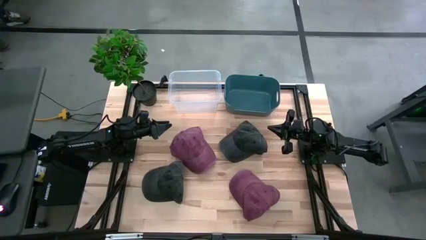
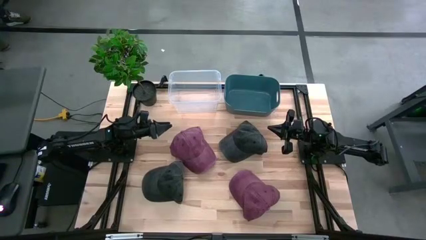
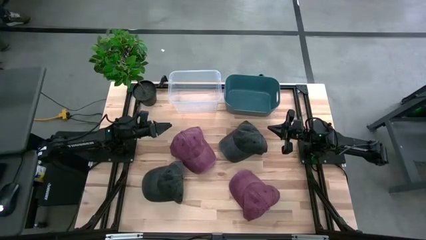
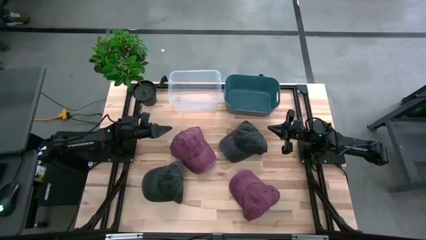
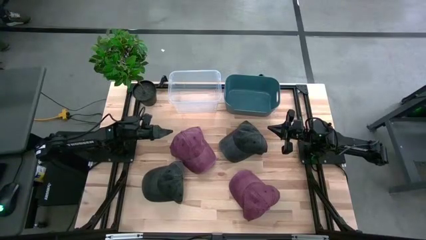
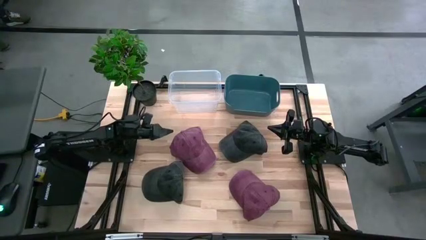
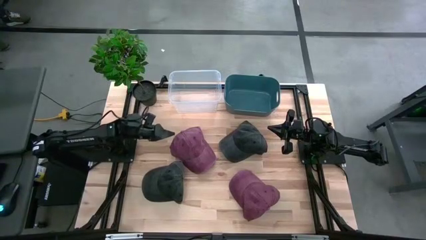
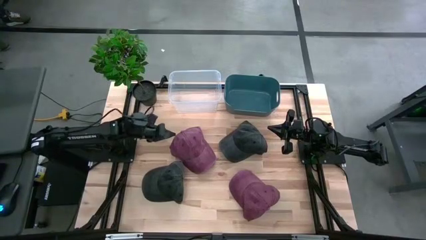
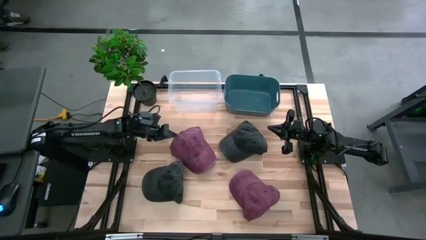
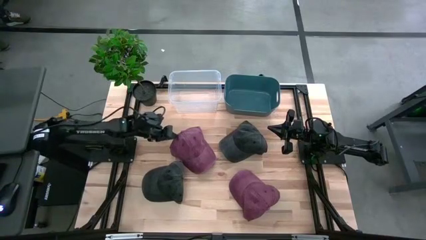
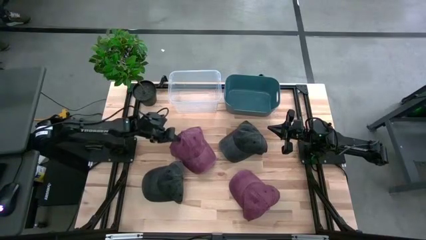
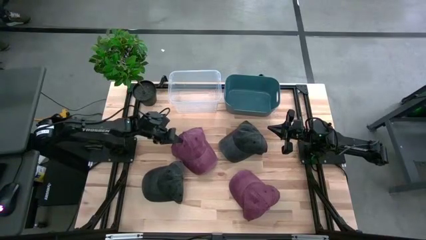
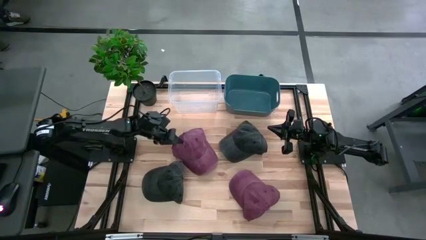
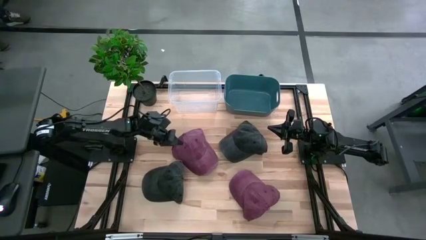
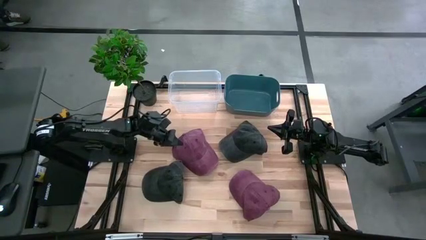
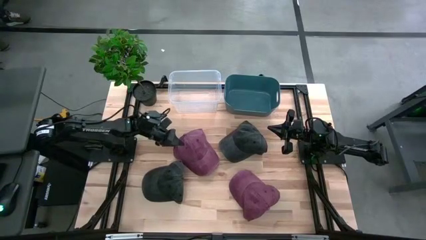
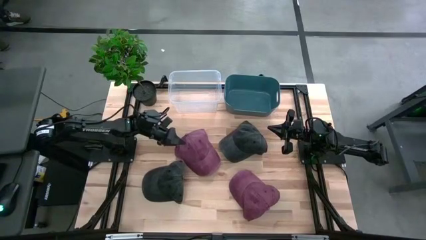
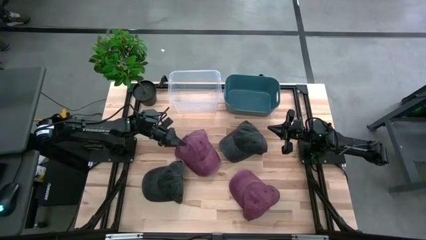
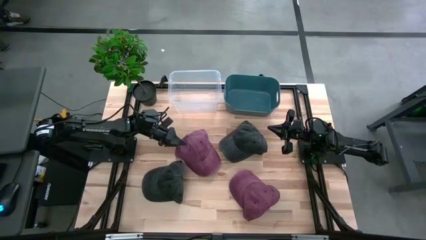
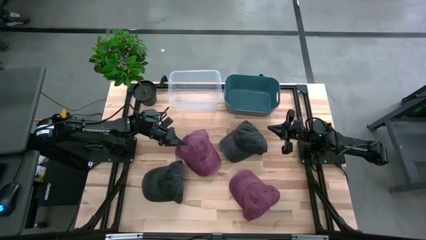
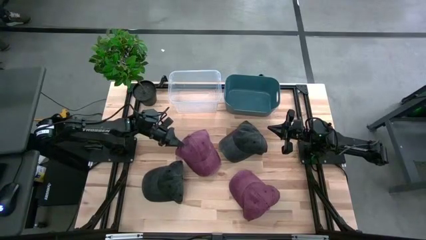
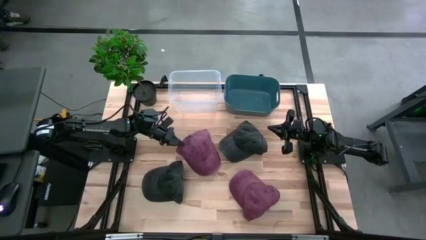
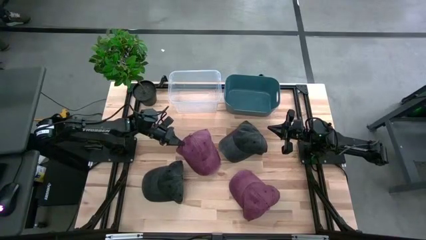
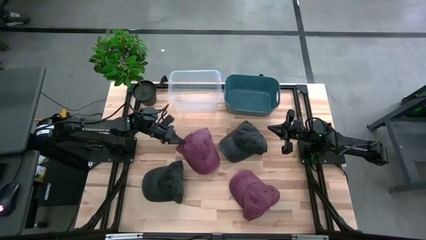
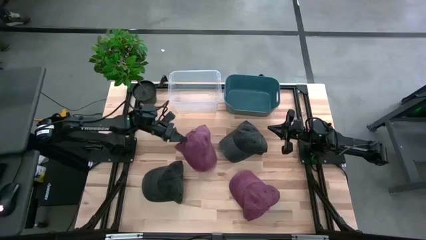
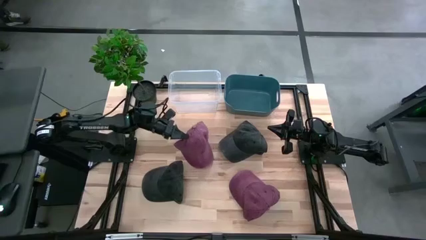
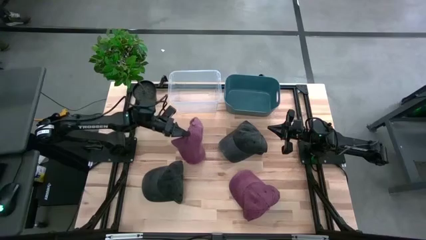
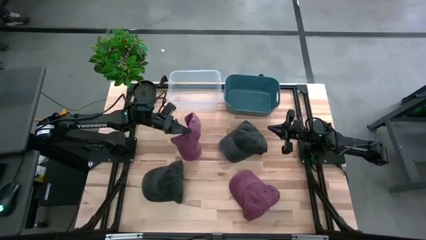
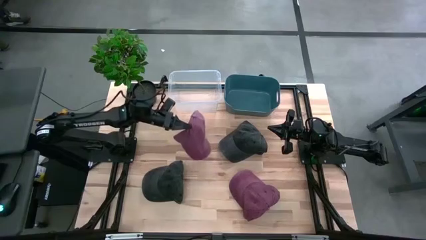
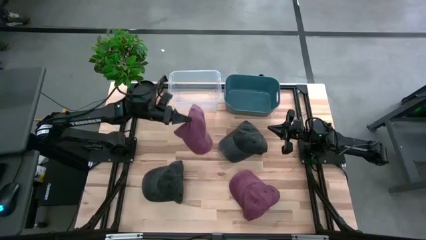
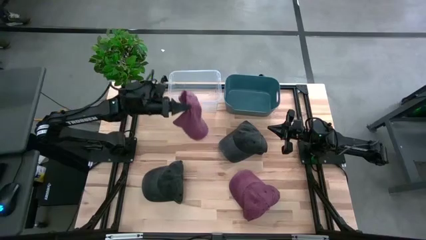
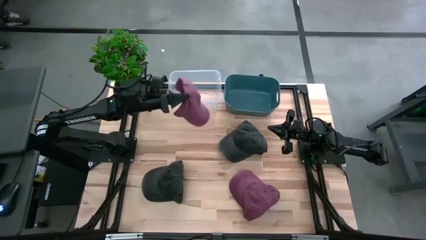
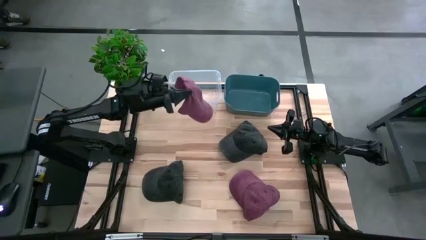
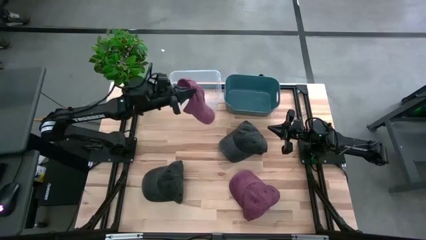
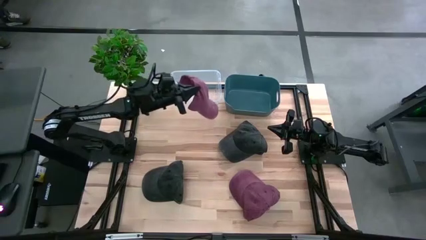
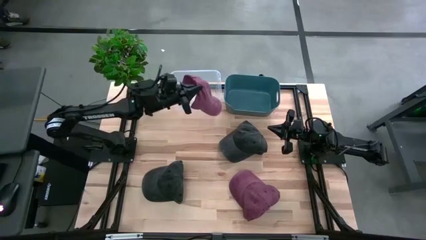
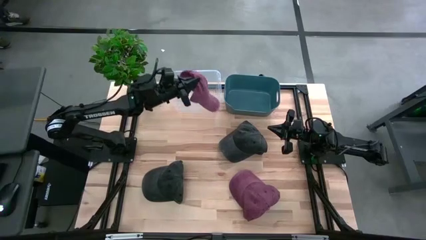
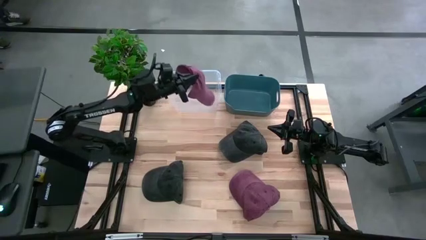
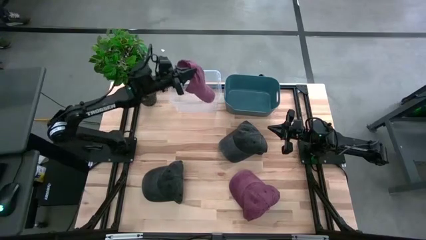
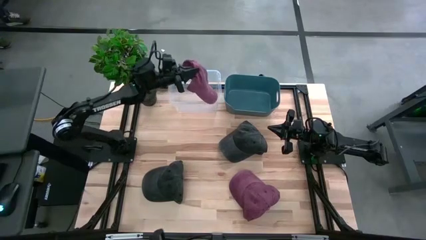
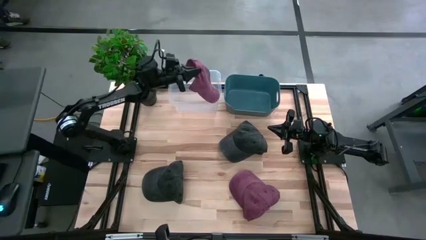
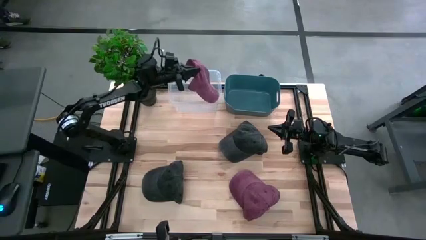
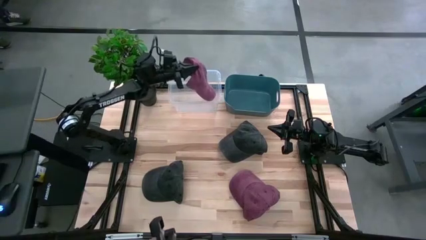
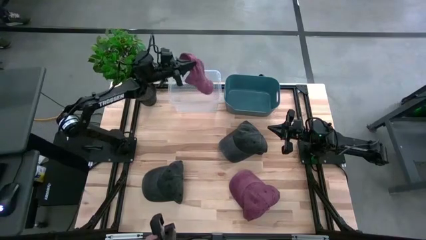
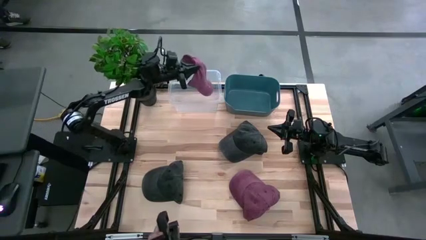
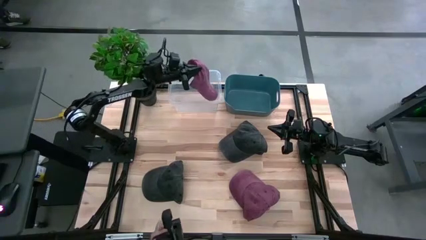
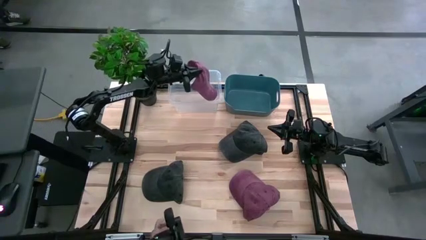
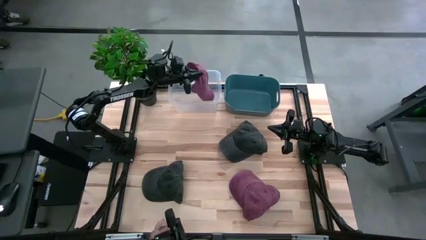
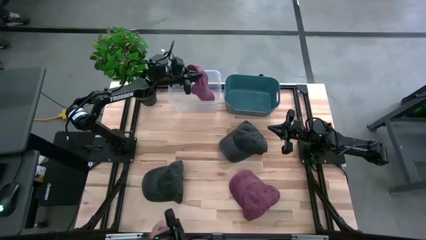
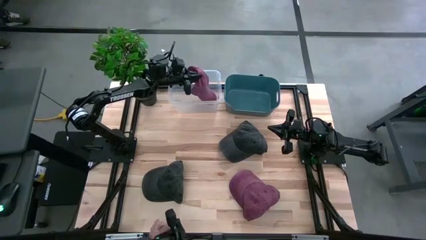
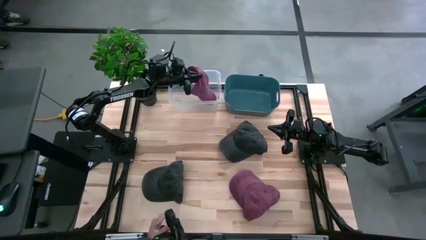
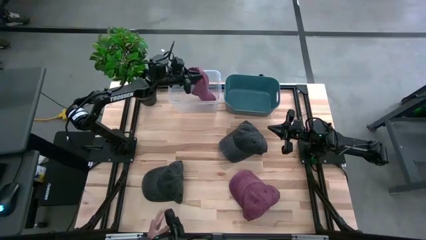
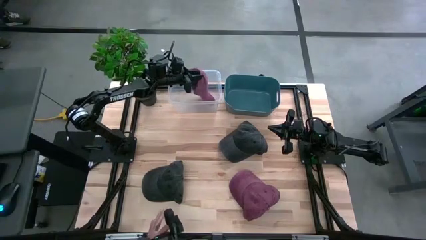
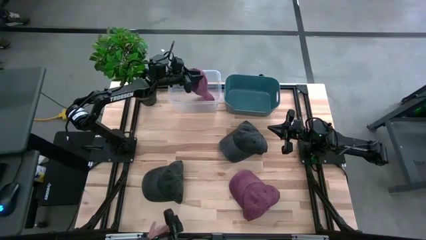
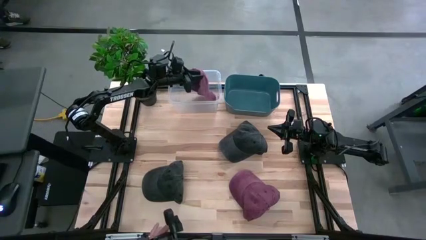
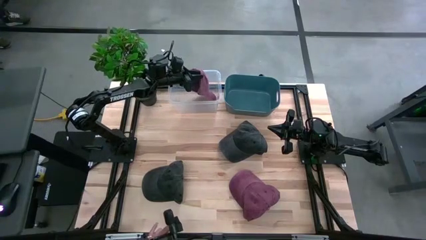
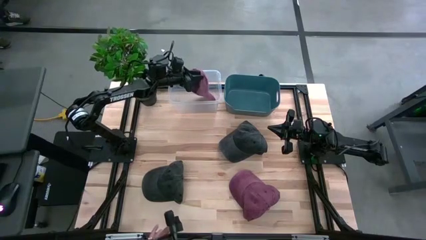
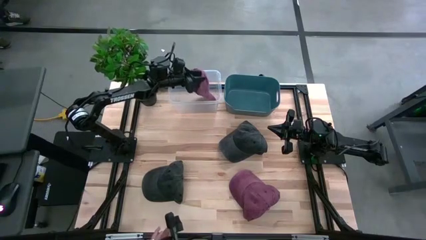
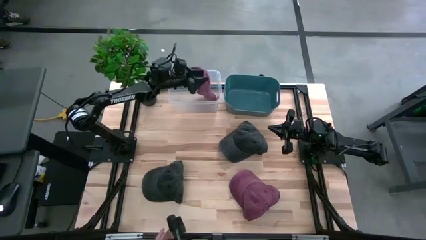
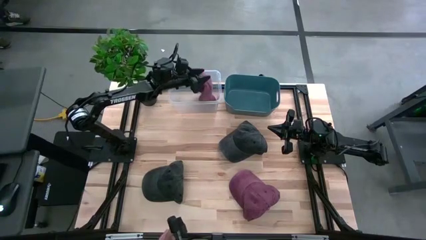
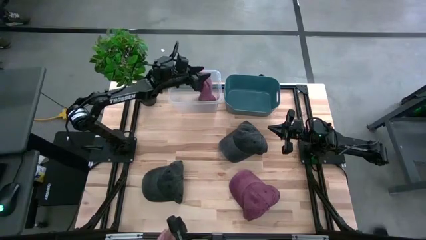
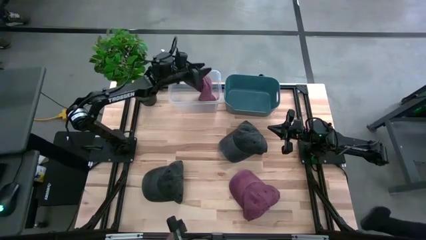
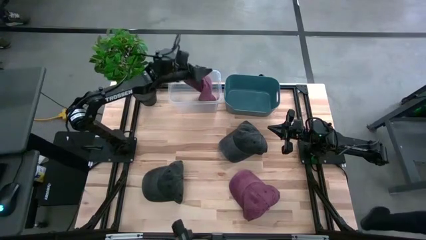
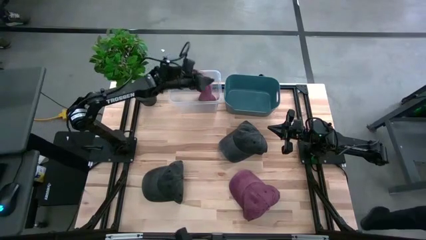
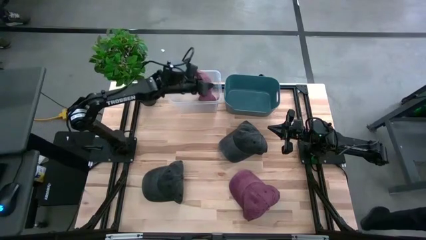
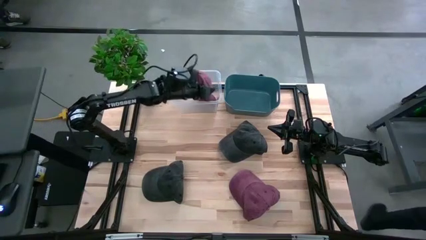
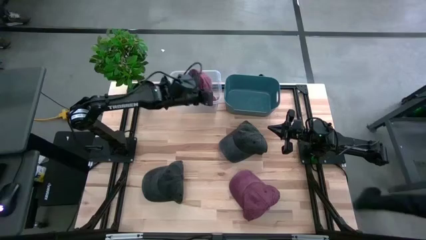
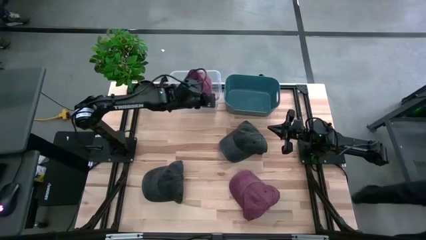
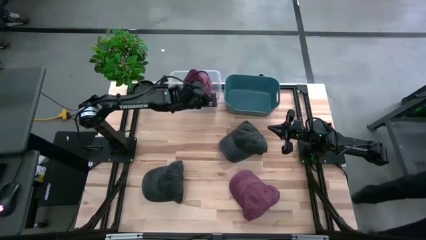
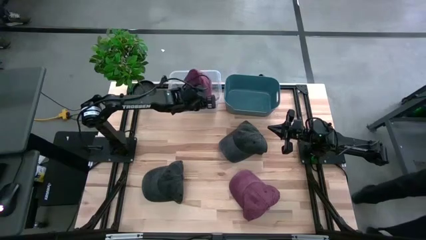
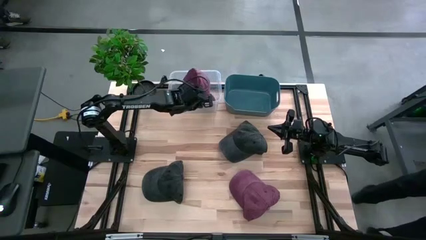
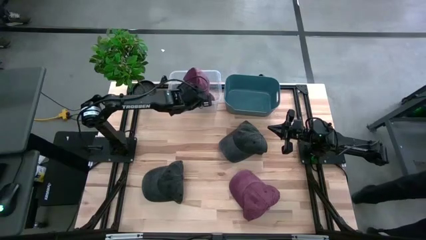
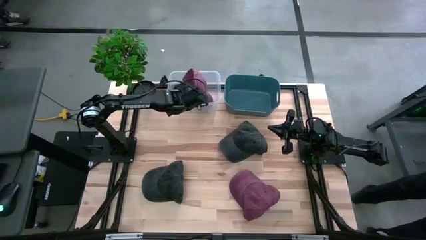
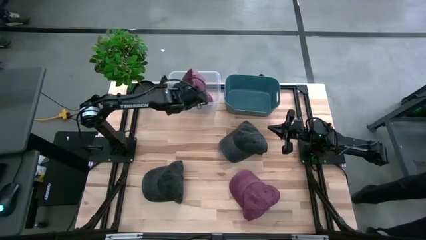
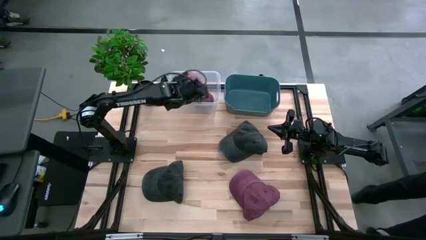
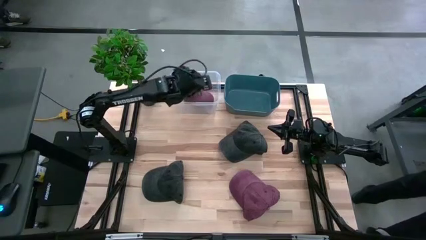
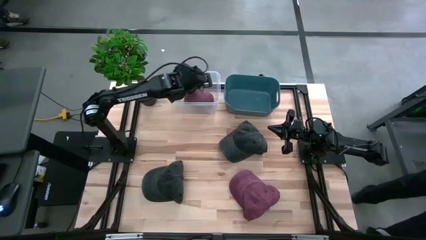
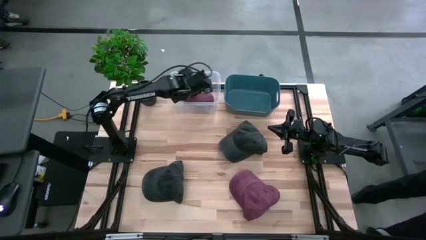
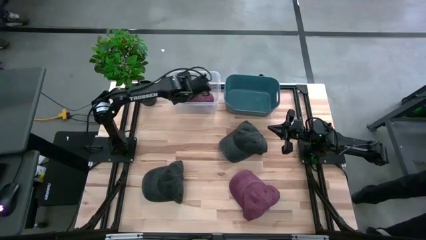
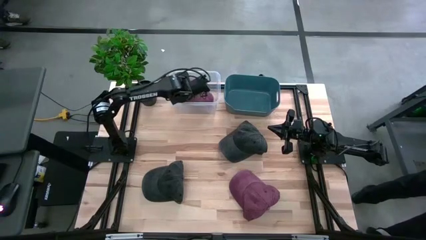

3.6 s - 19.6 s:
Task: Pick & Place hat
Put the top red cap into the transparent bin
